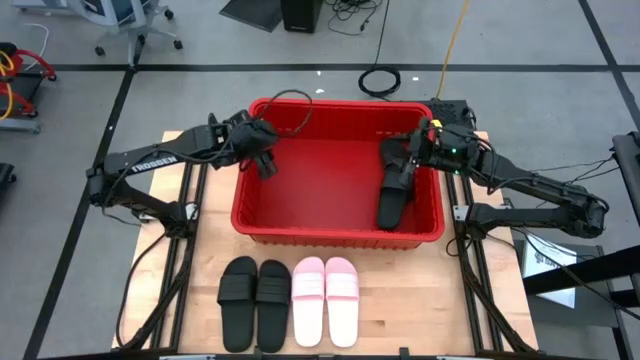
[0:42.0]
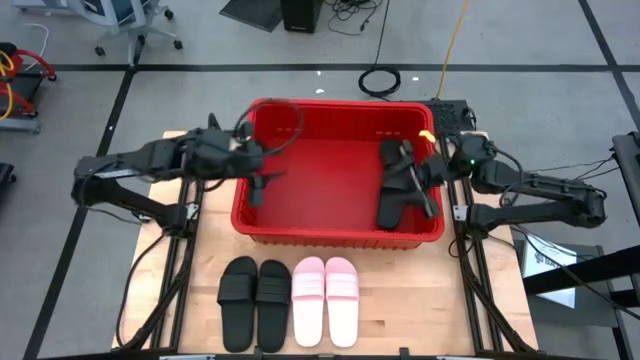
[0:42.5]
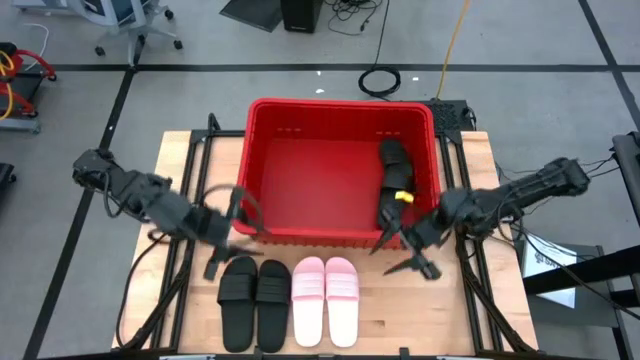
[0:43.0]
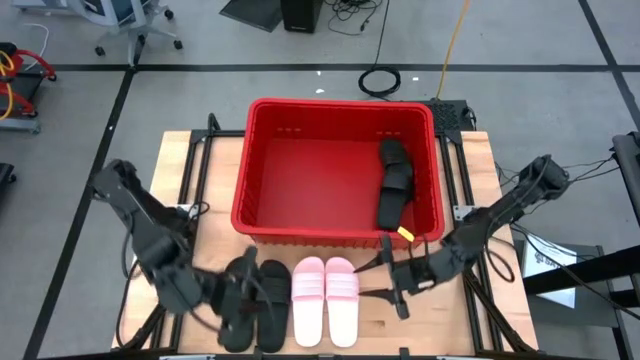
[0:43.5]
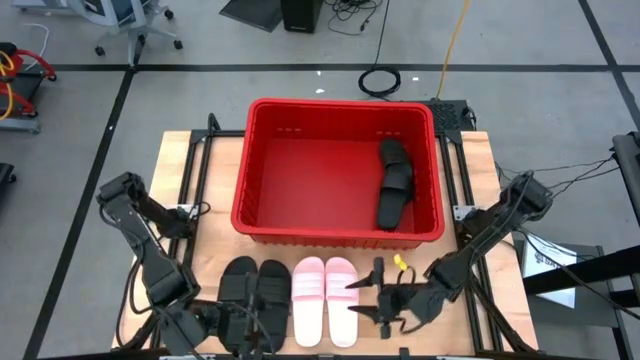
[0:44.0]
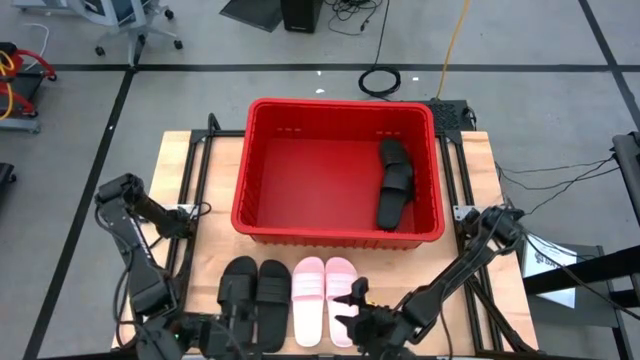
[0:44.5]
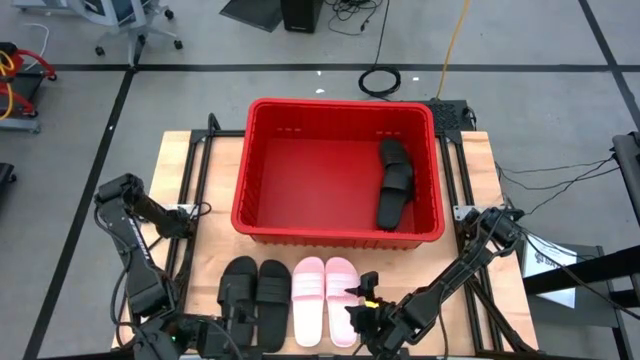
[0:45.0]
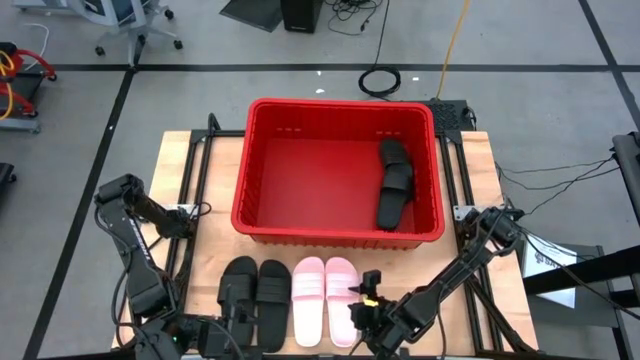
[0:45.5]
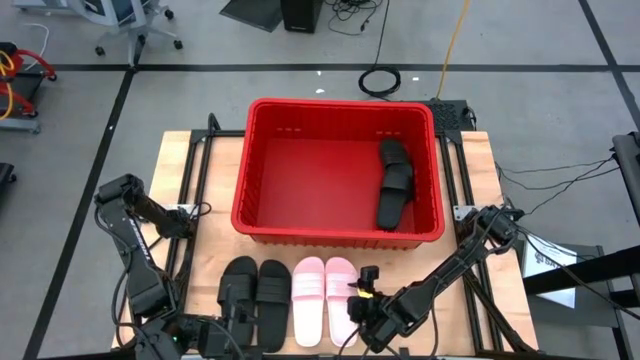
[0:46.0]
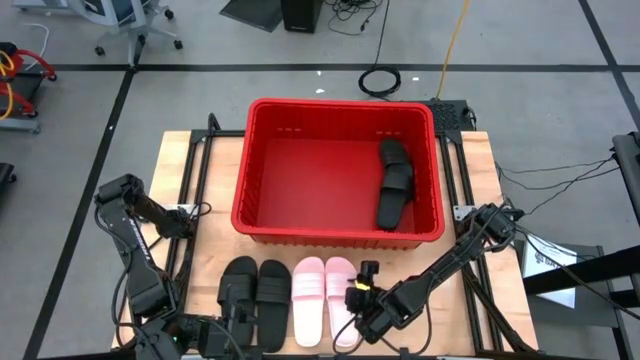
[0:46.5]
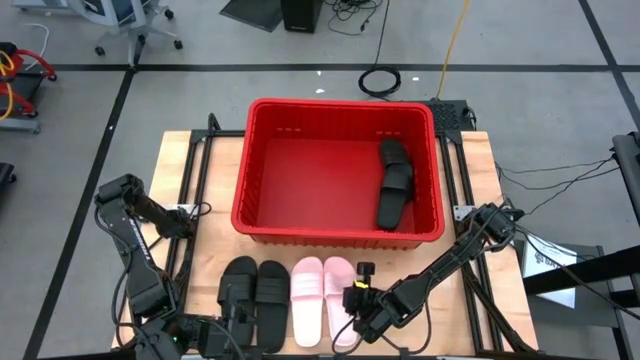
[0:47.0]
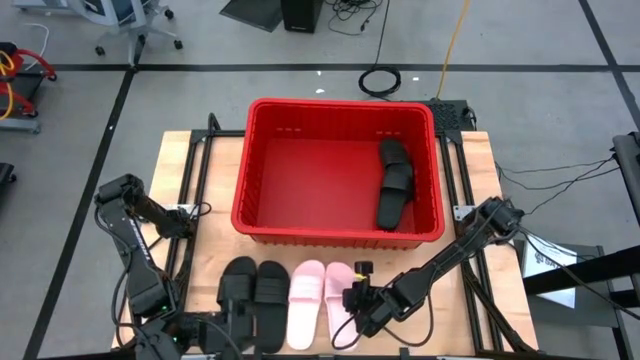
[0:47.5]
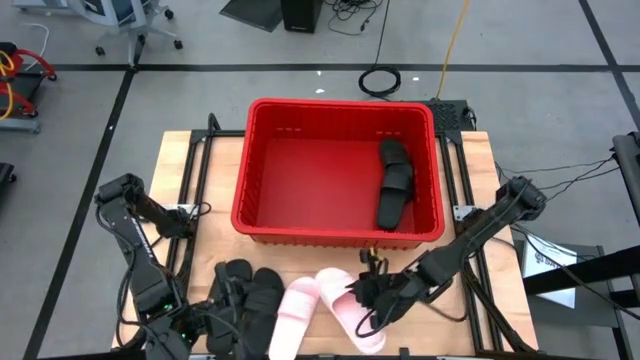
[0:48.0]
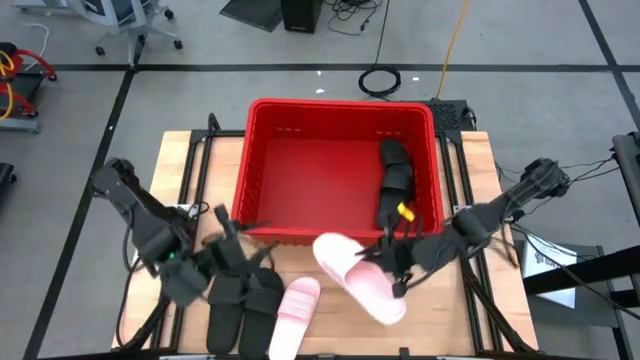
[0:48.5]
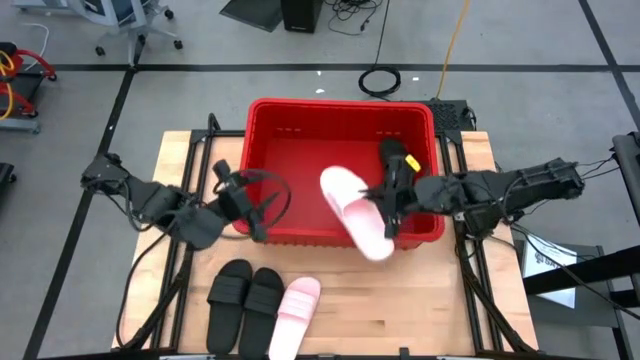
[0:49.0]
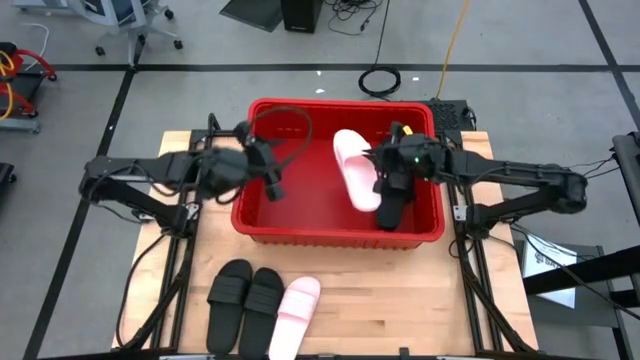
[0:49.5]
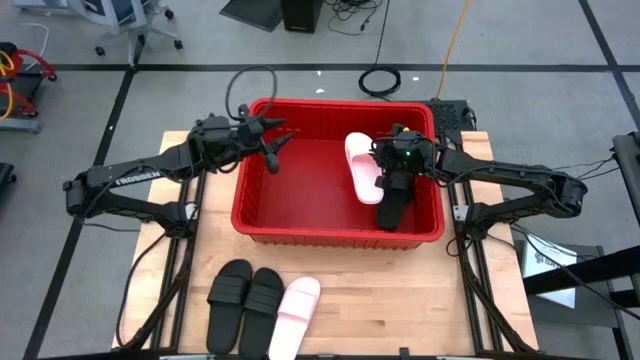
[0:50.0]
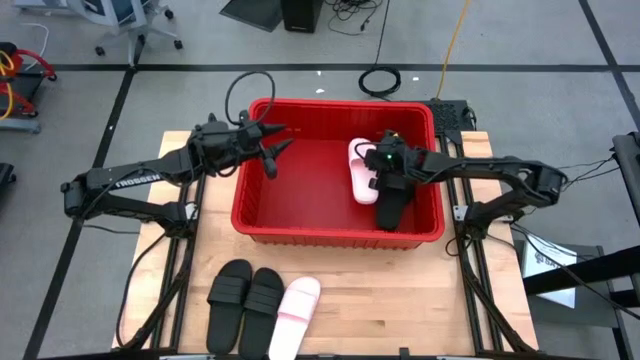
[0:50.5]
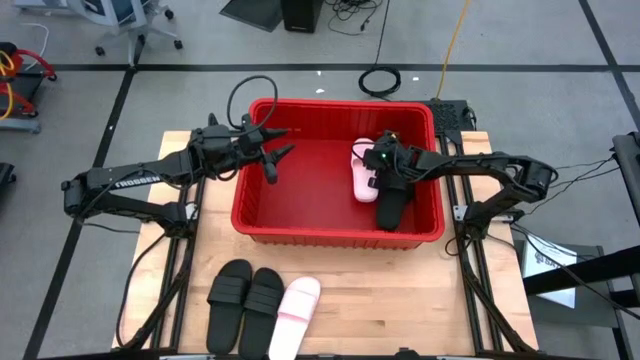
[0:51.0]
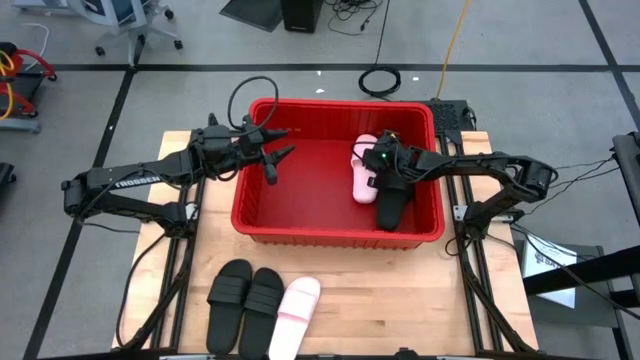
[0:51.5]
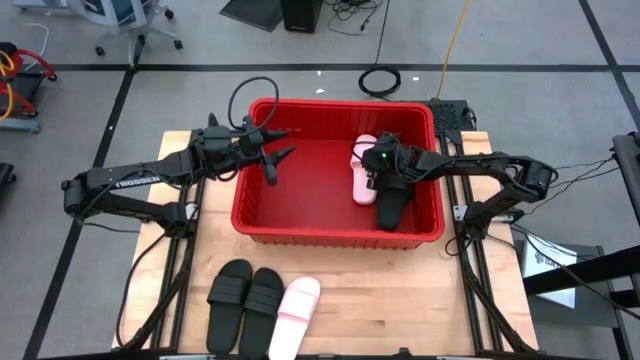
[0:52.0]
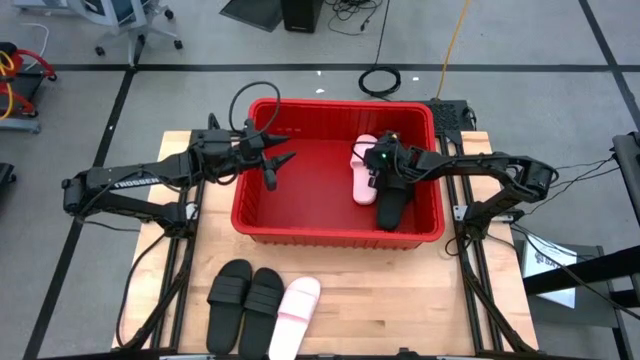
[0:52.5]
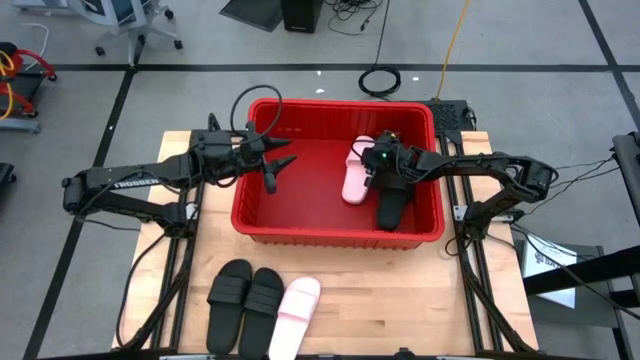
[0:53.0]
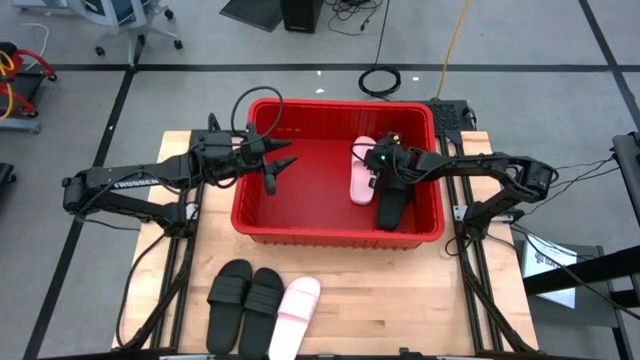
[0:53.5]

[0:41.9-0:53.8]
Task: Pick and place slides into bin
Put the right pink slide into the red bin
